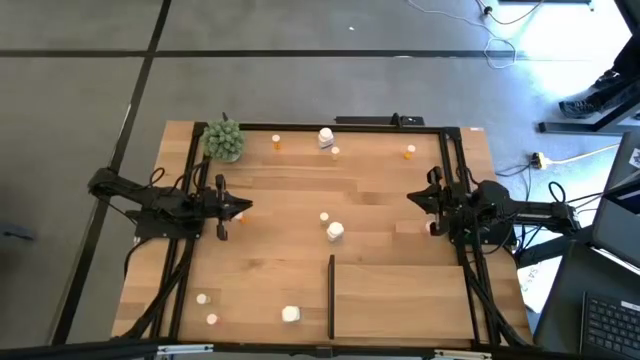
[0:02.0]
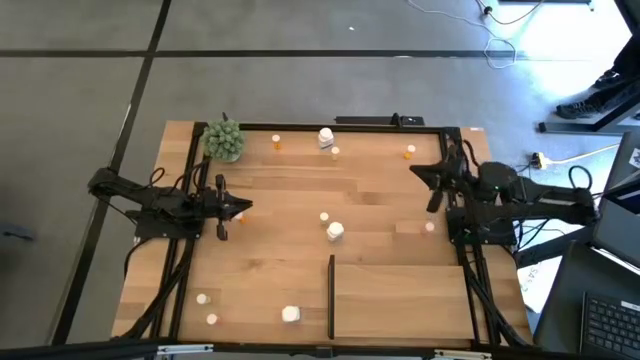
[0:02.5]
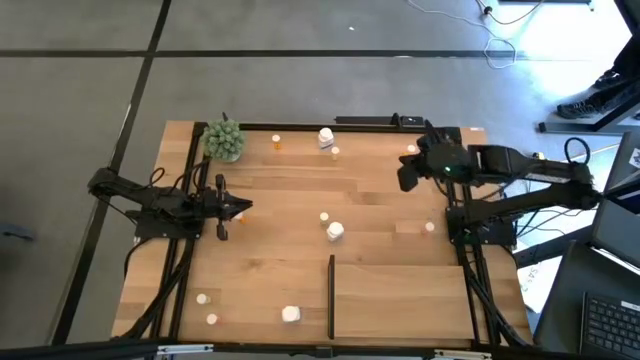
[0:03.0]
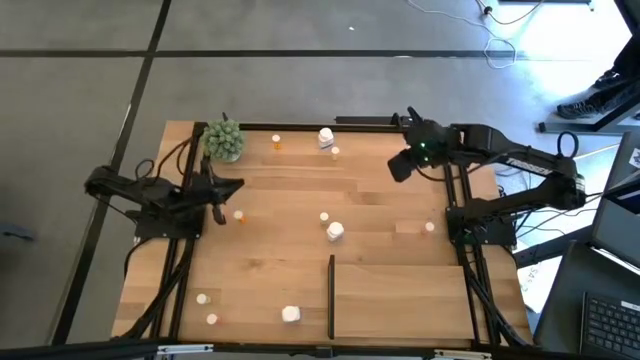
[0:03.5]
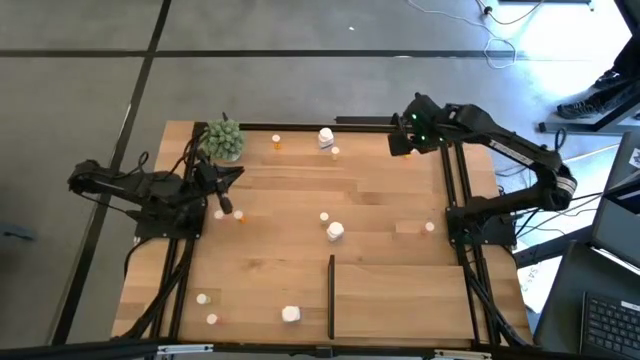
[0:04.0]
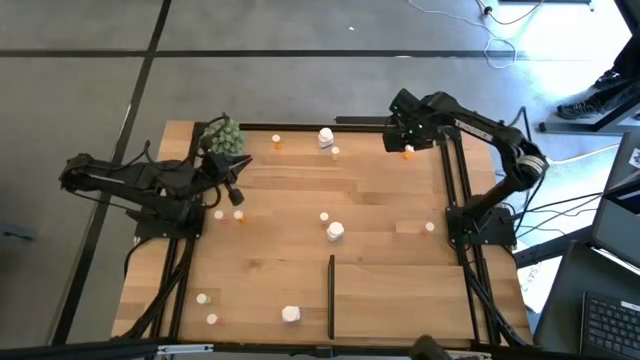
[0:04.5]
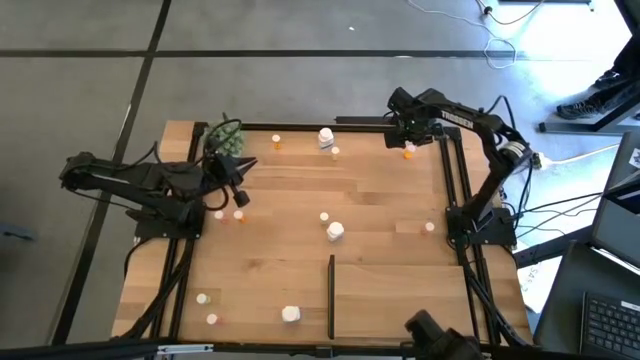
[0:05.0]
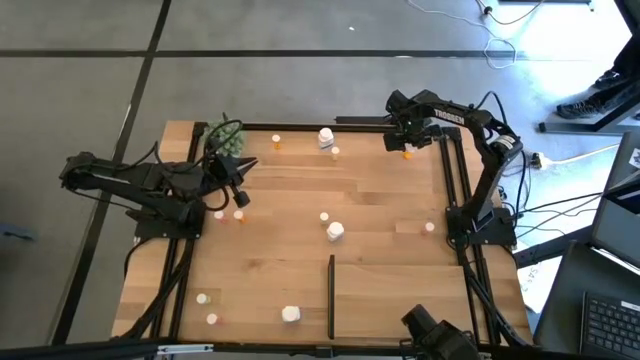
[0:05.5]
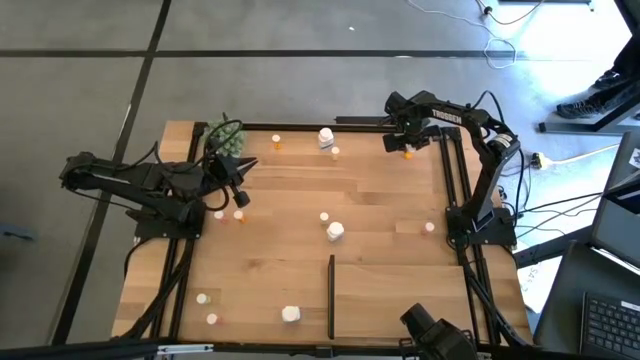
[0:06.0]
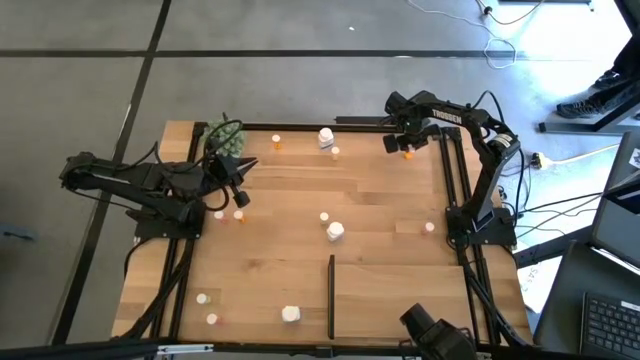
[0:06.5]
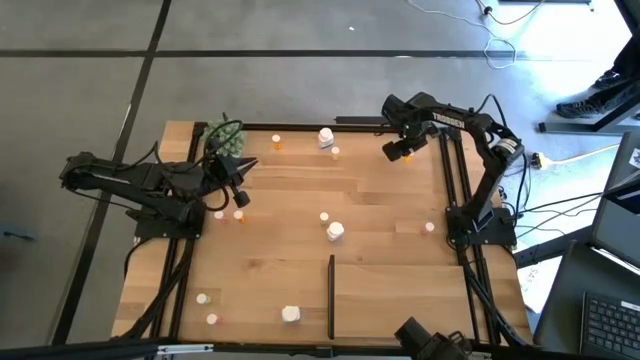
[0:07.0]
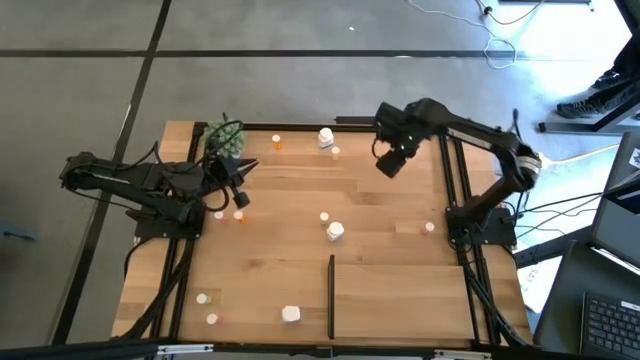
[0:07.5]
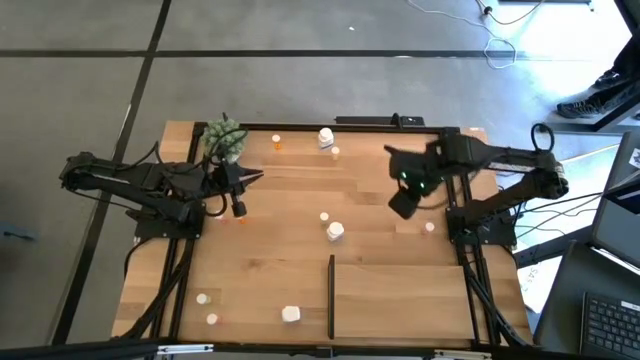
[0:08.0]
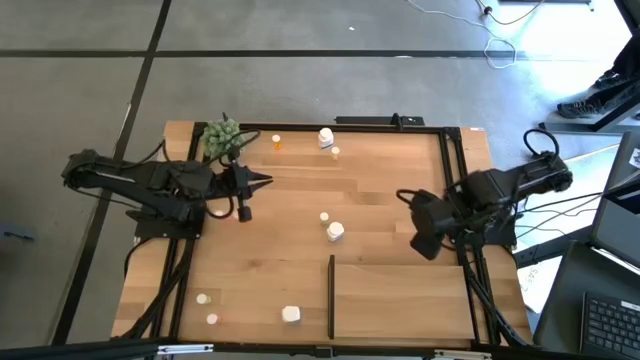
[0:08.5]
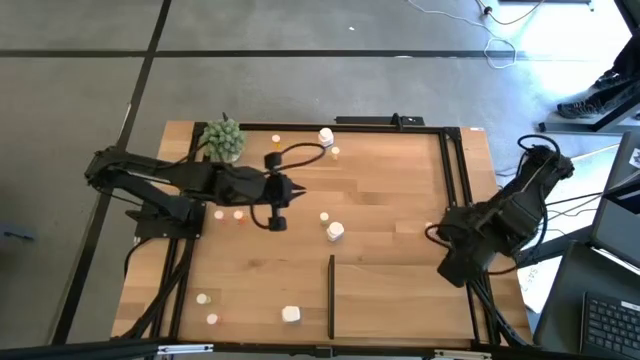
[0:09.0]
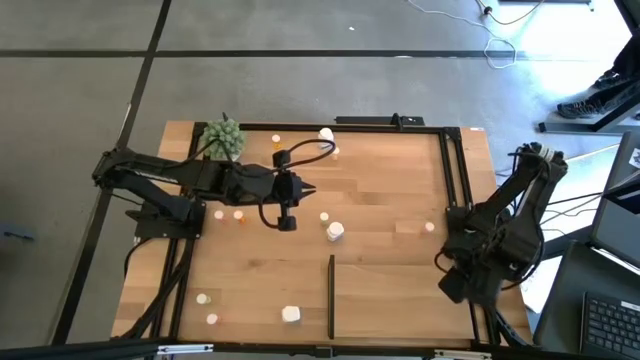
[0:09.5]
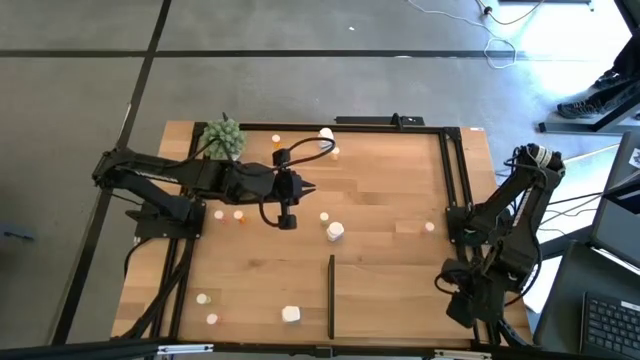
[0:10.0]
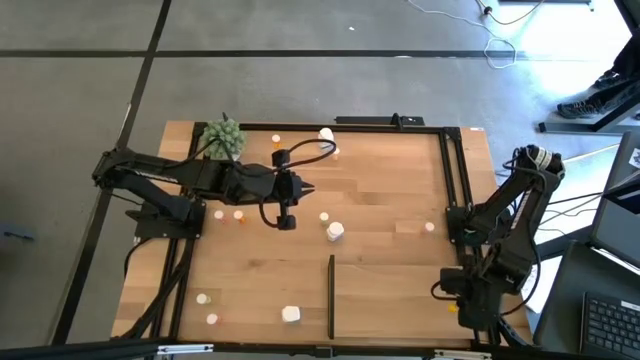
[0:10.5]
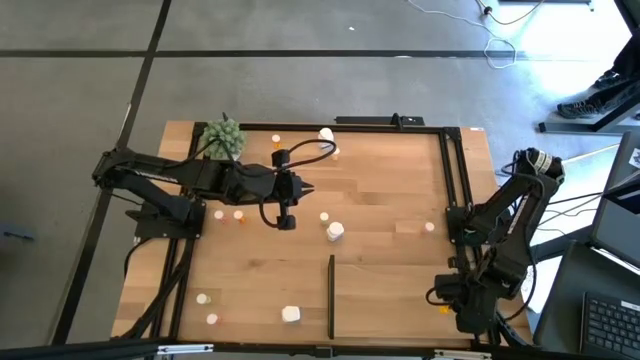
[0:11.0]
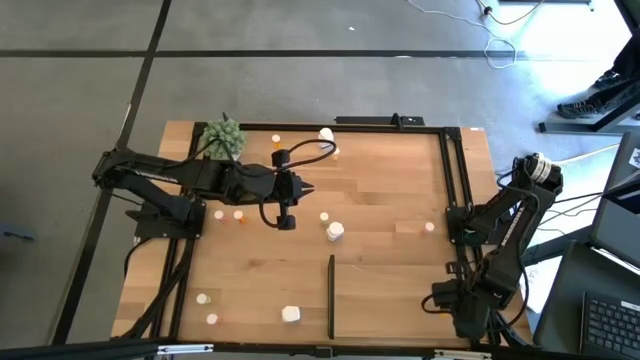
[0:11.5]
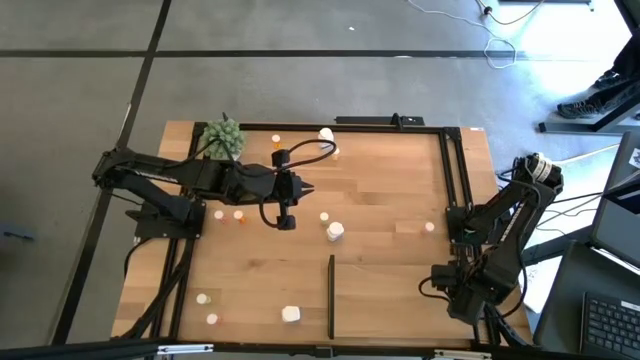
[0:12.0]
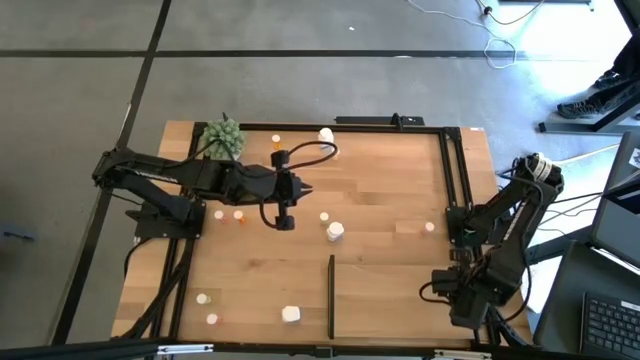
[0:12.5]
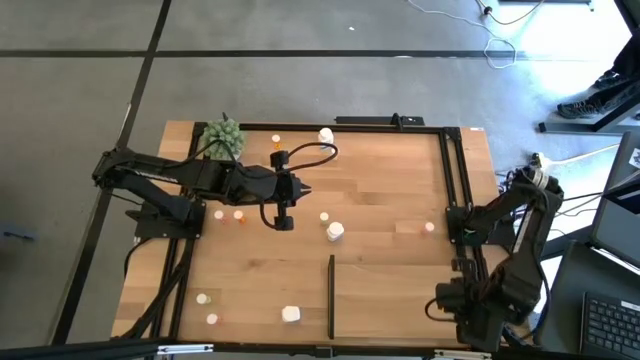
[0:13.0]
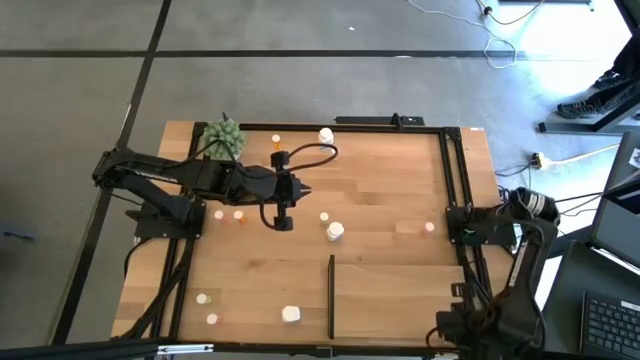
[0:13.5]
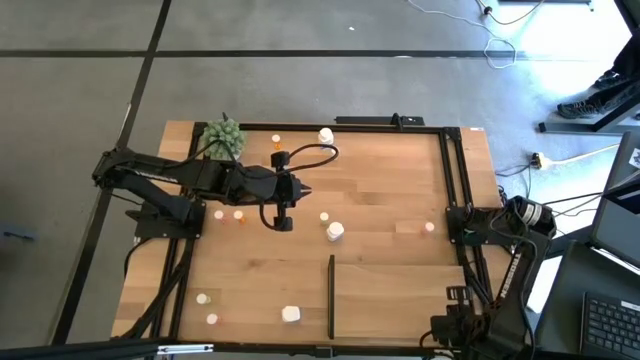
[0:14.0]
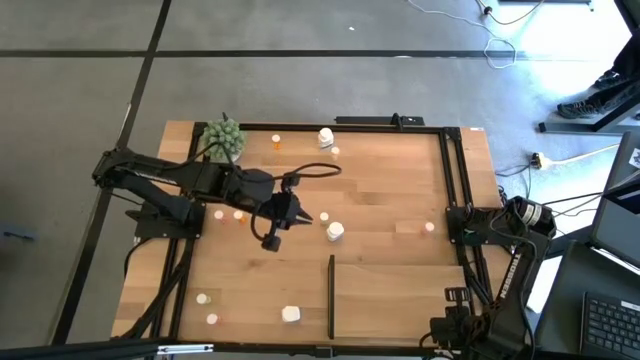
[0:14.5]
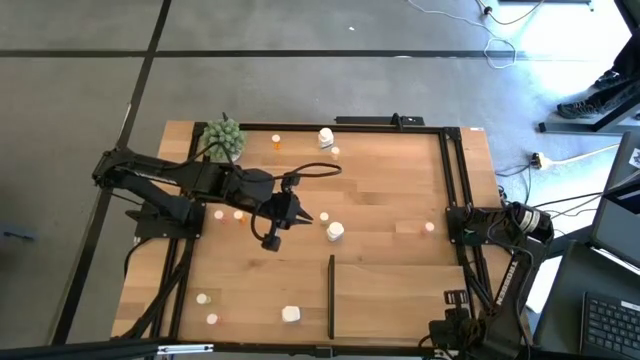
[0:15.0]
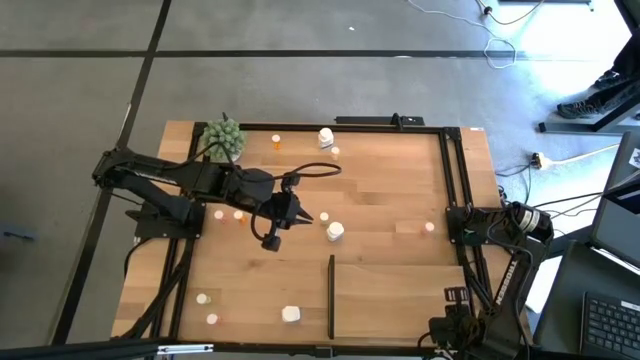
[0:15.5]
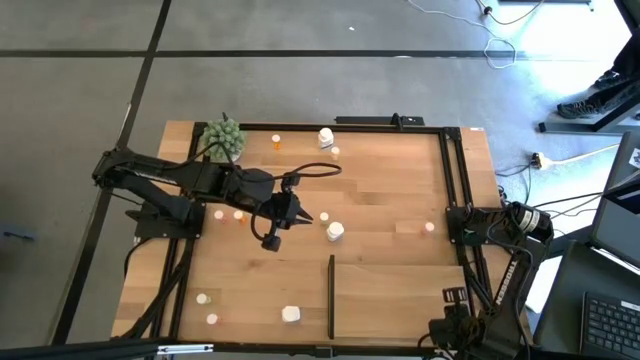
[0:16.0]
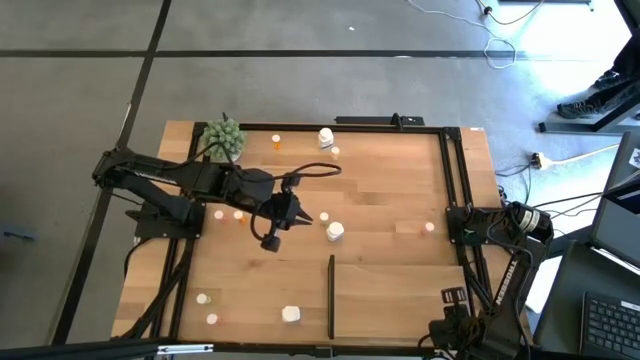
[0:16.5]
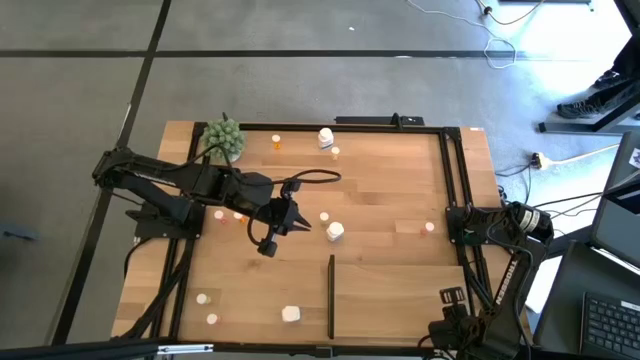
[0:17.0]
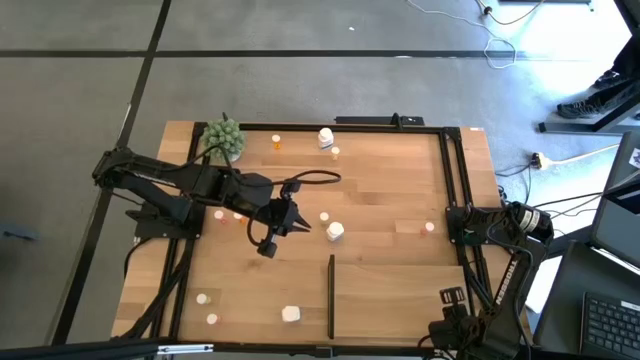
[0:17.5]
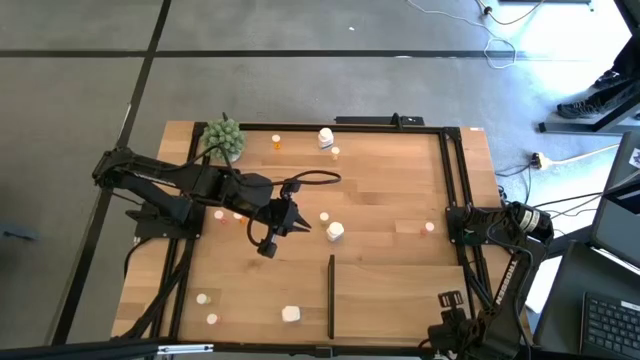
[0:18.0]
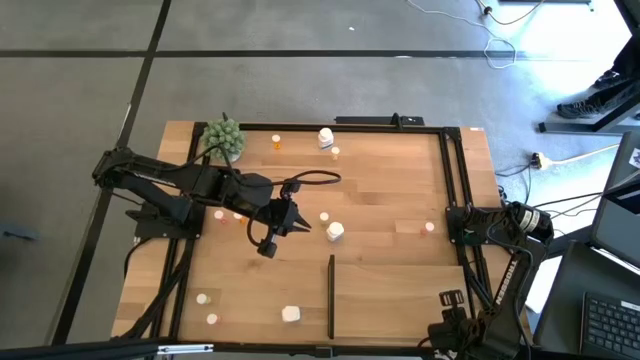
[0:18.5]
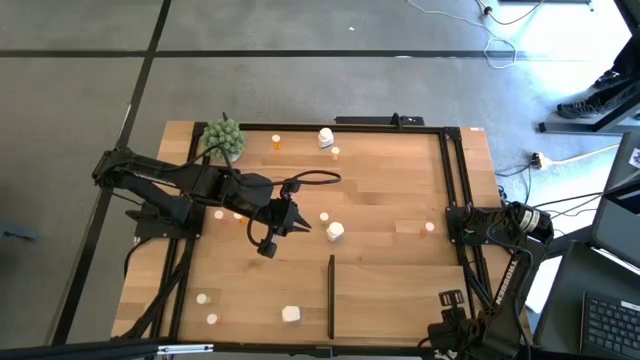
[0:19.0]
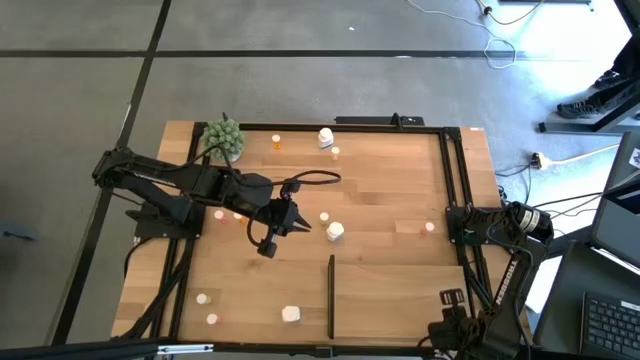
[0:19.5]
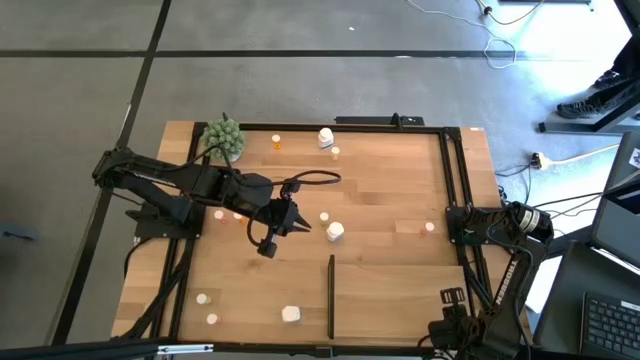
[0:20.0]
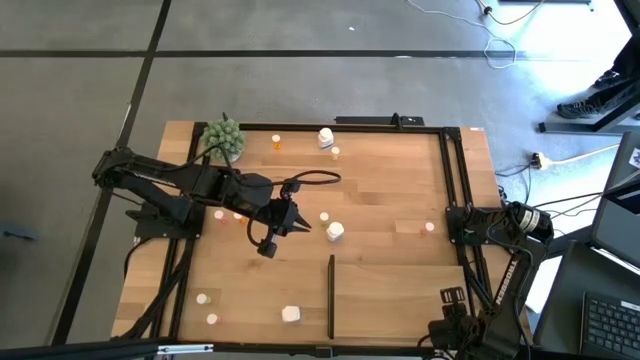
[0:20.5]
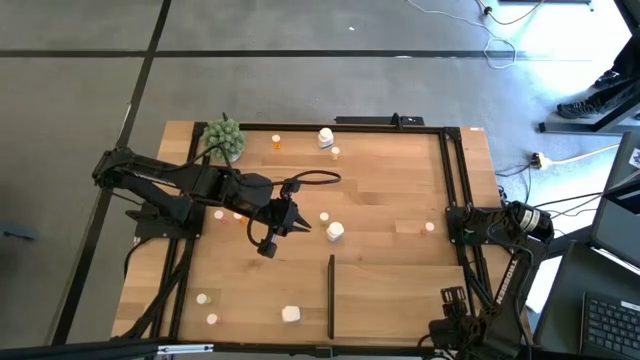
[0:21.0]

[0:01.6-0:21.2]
Task: Pick and place medicine bottles onto shelf by color
Put the top right orange pill bottle on the shelf
